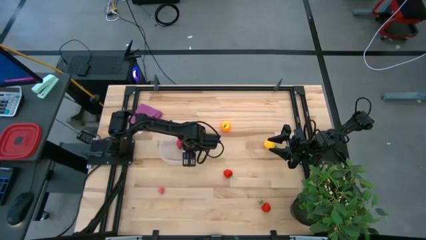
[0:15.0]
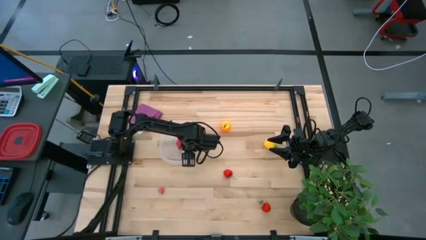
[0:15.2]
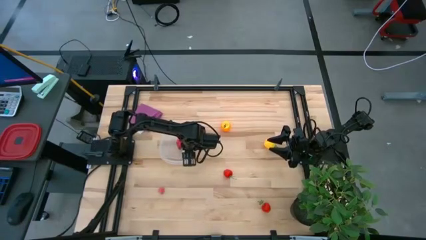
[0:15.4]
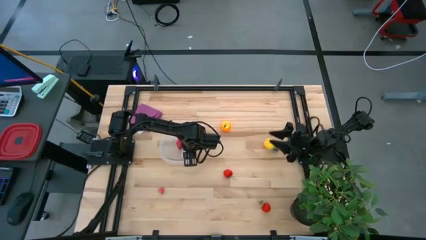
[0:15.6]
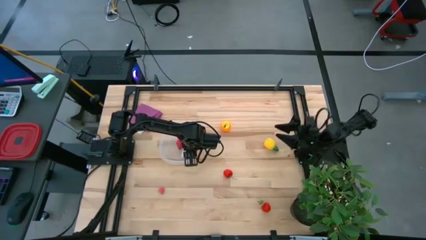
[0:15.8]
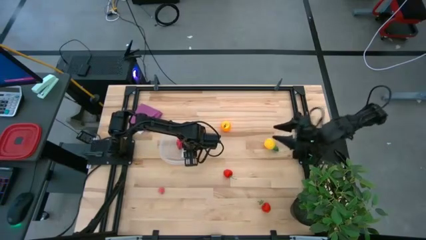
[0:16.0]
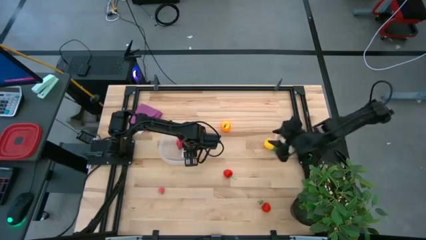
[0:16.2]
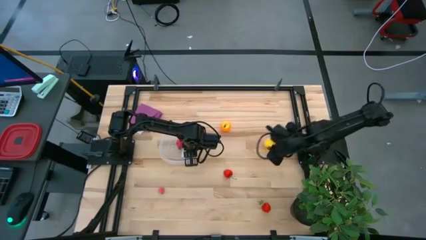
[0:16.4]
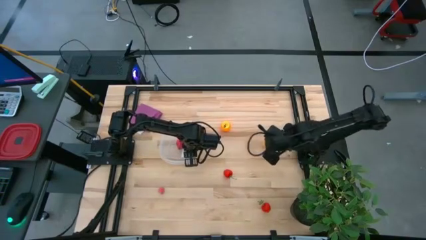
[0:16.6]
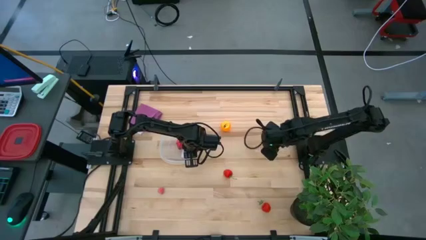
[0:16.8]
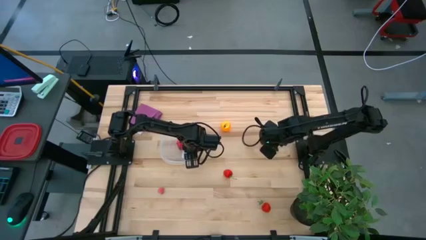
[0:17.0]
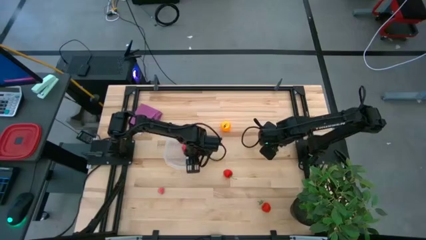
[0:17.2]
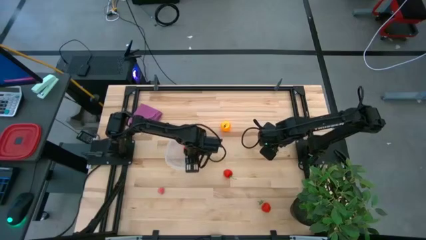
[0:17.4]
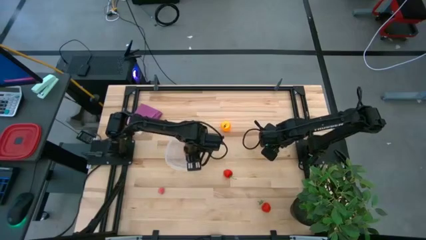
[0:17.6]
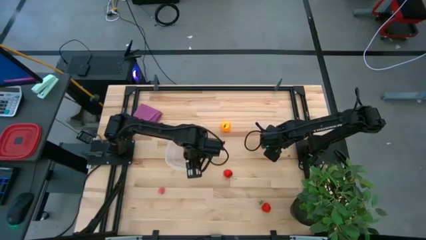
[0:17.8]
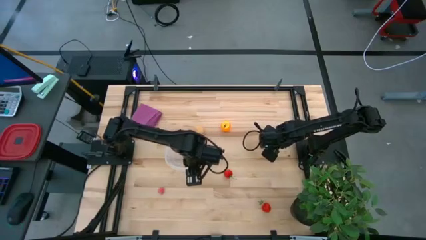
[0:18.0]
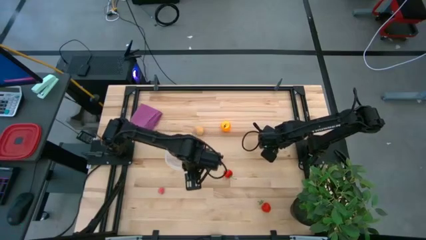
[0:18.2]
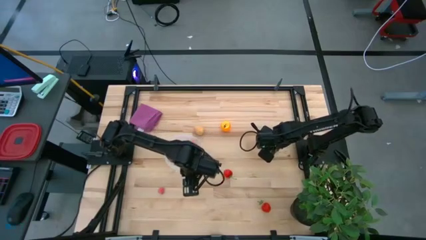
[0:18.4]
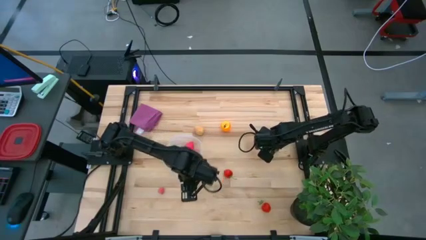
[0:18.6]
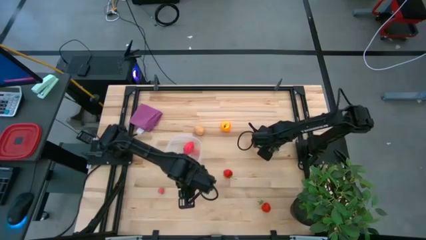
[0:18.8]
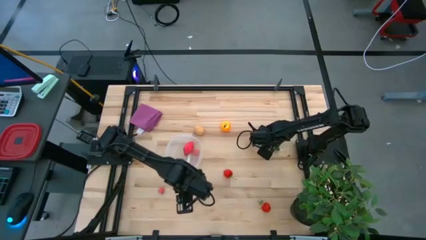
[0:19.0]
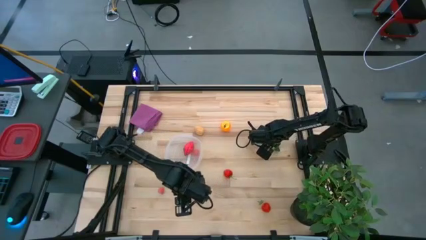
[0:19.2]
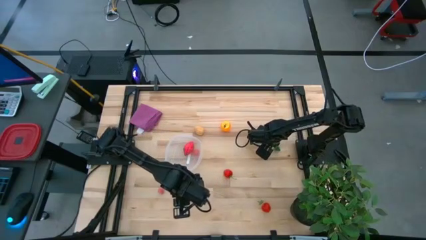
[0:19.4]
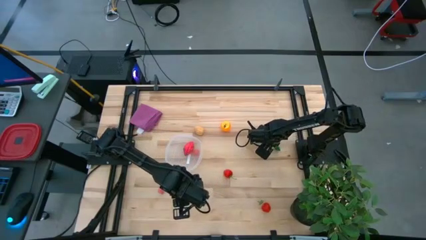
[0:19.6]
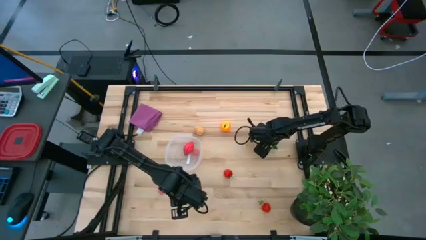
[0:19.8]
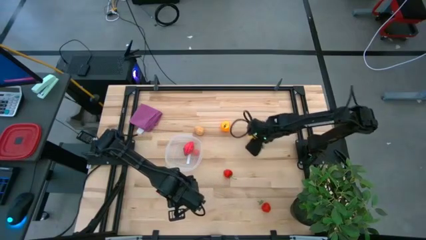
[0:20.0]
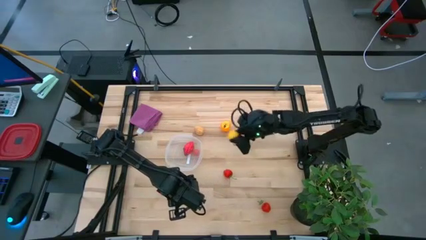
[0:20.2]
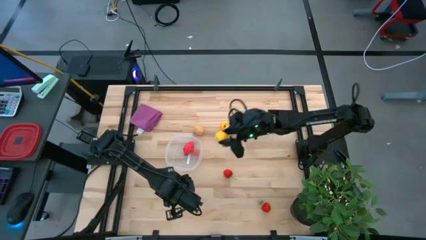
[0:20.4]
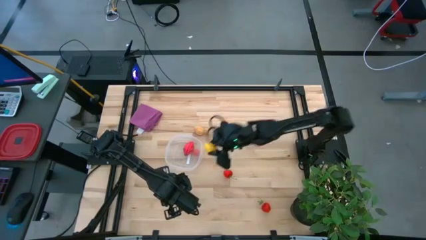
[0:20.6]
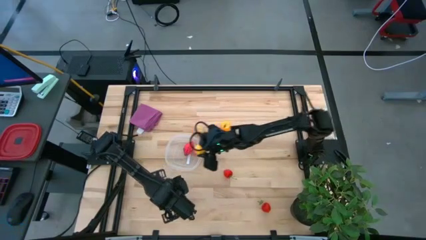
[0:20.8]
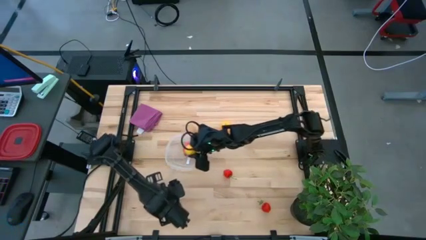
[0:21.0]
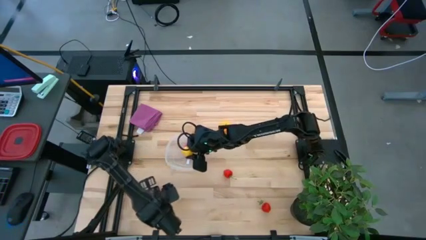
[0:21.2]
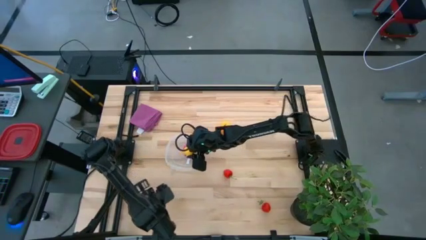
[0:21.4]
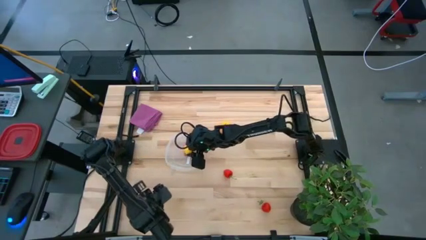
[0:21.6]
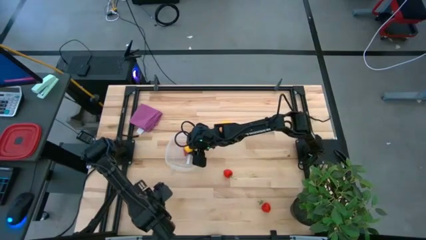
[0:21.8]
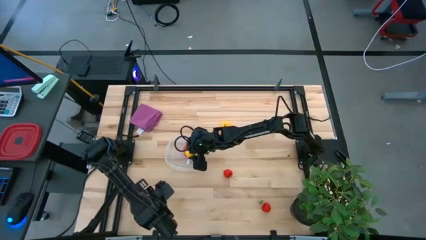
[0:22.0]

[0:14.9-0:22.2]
Task: Pick and placing Produce into tupperware
Put the yellow pineapple into the transparent bin

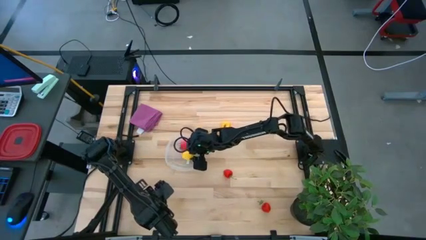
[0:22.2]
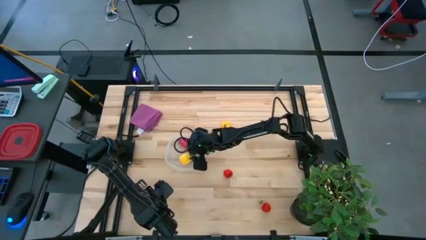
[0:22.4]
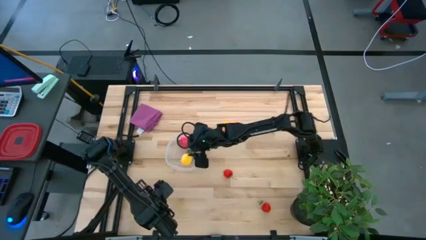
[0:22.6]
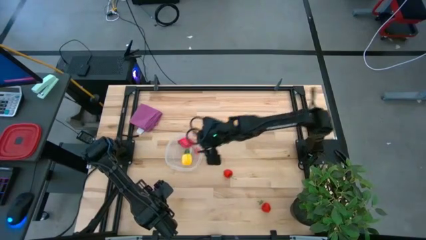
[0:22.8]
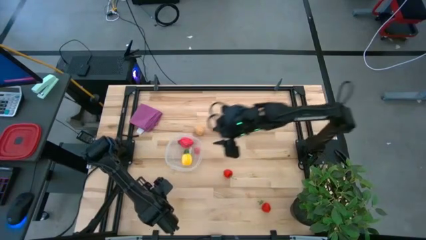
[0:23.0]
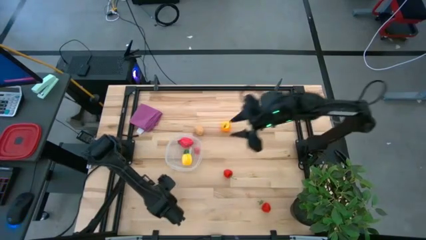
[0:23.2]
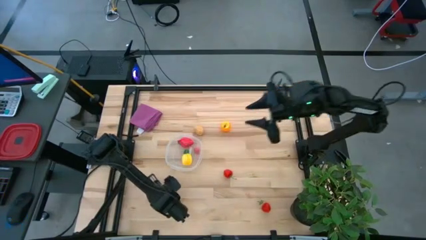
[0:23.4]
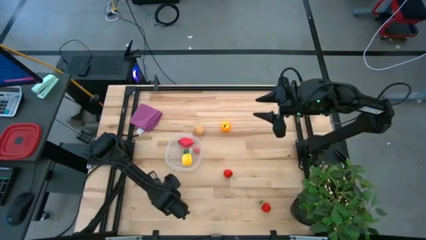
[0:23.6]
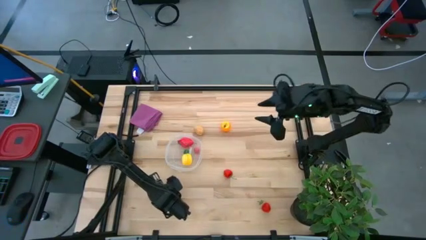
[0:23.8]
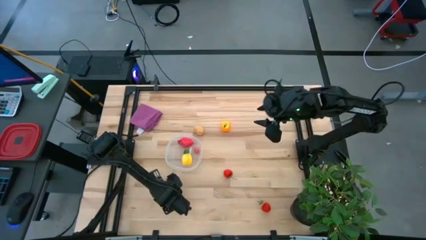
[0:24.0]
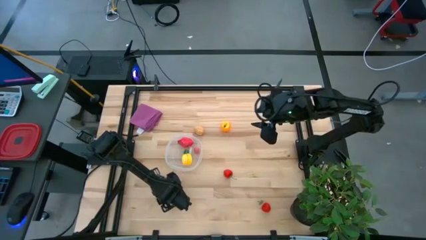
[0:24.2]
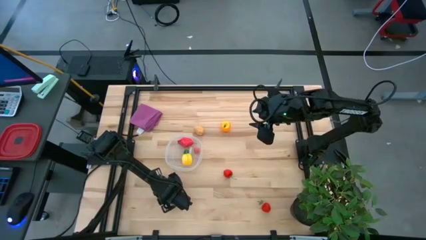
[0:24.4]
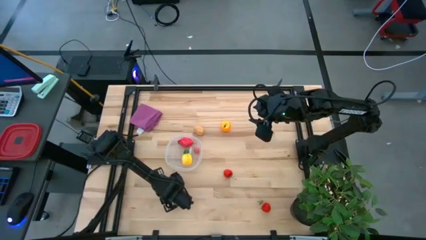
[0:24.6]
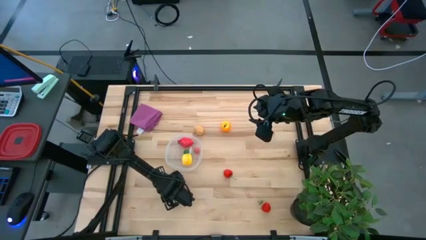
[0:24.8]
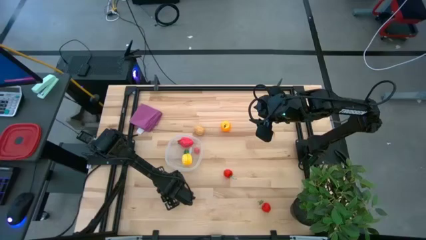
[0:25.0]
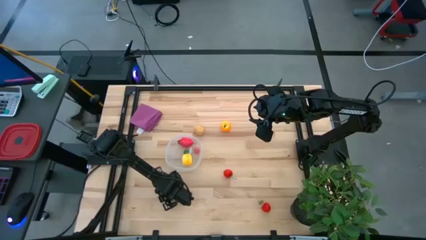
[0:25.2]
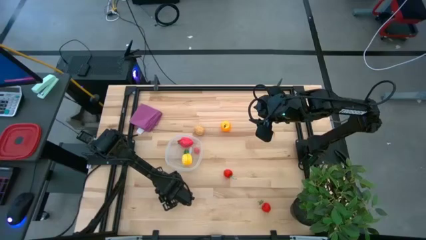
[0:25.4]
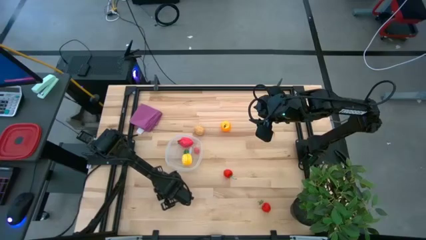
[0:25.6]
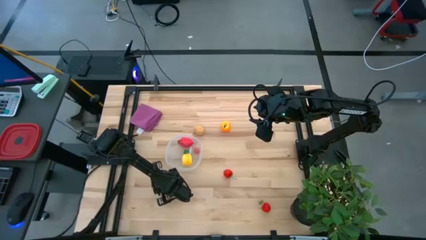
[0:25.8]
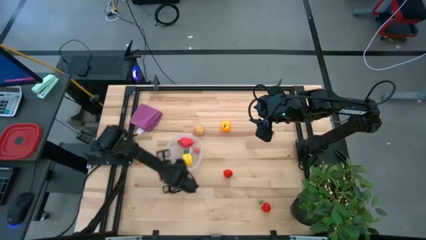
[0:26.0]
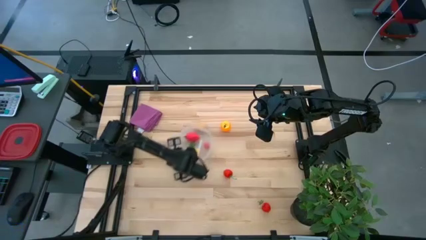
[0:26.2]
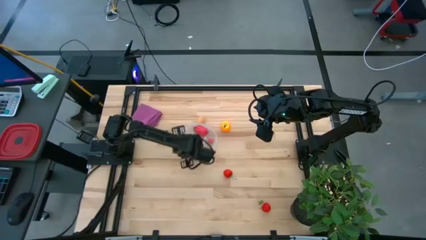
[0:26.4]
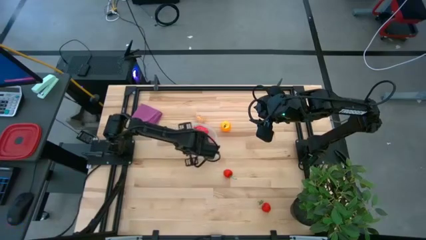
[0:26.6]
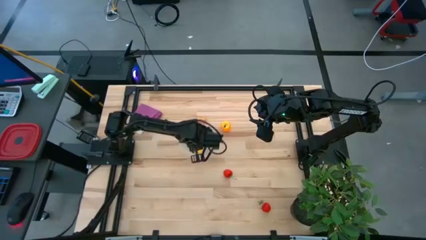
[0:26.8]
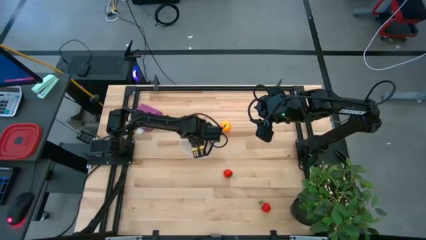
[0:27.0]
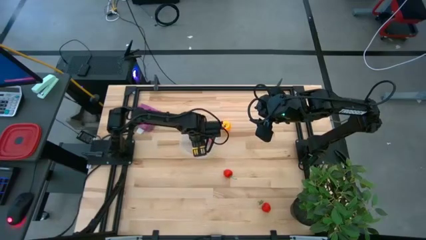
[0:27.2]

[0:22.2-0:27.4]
Put the pink peach into the transparent bin

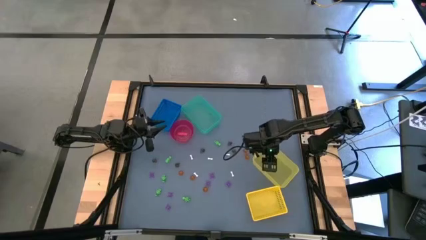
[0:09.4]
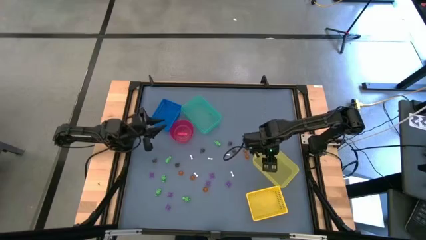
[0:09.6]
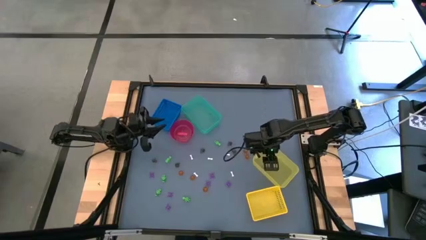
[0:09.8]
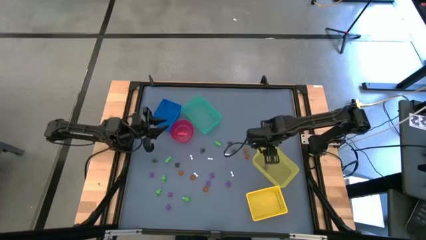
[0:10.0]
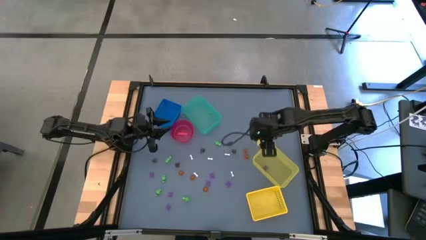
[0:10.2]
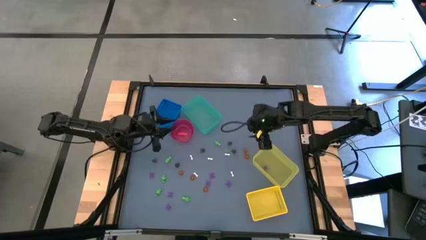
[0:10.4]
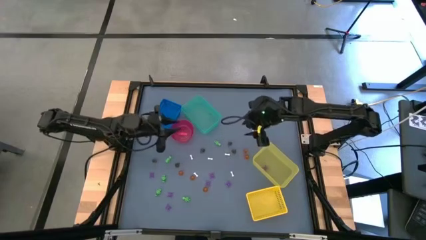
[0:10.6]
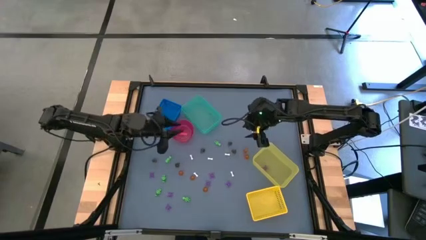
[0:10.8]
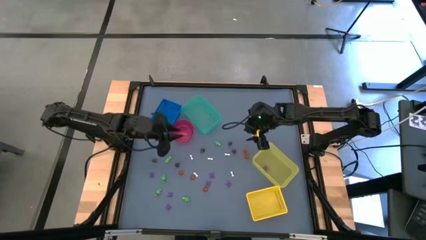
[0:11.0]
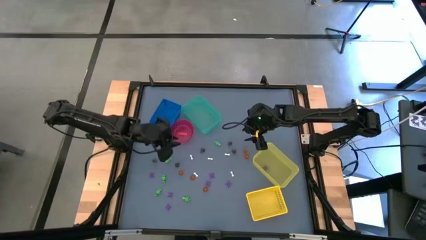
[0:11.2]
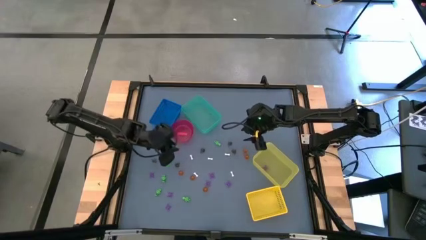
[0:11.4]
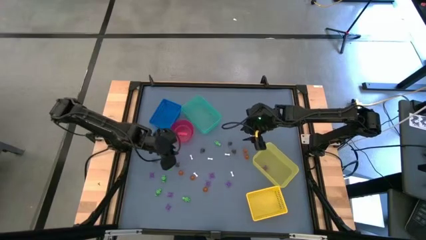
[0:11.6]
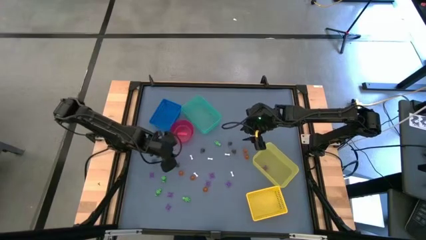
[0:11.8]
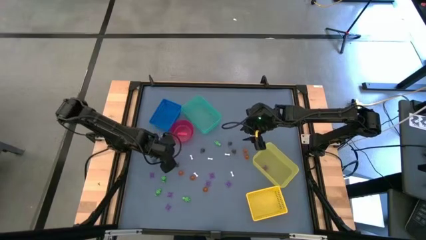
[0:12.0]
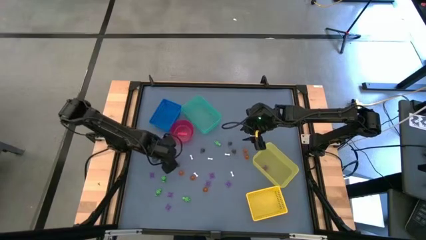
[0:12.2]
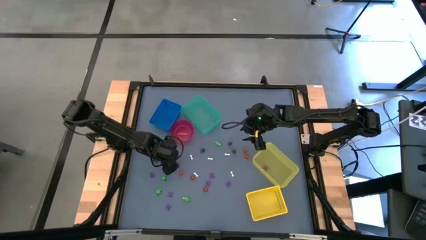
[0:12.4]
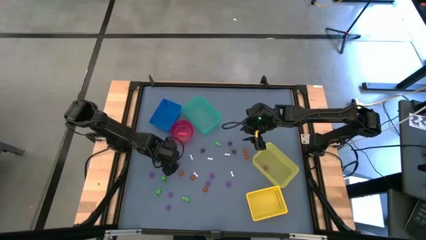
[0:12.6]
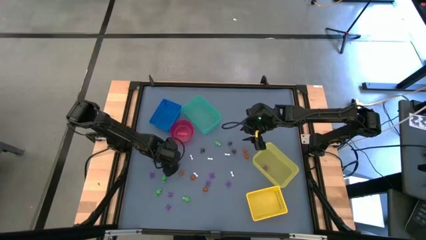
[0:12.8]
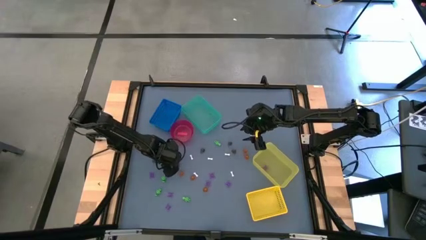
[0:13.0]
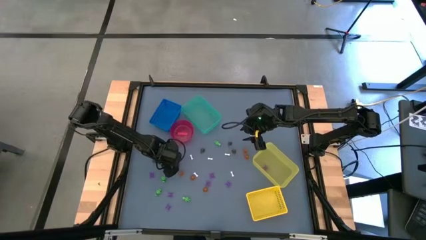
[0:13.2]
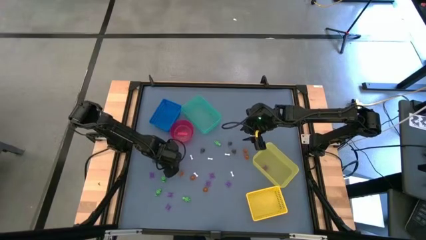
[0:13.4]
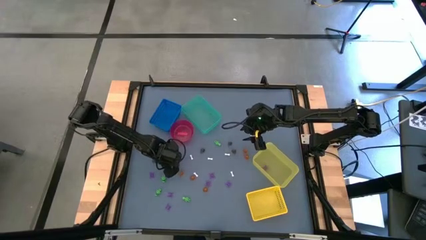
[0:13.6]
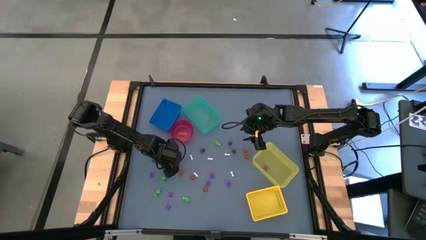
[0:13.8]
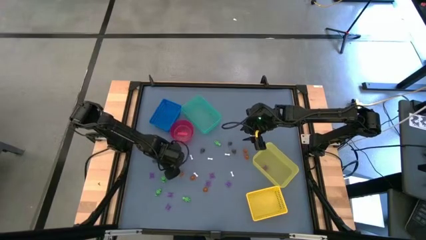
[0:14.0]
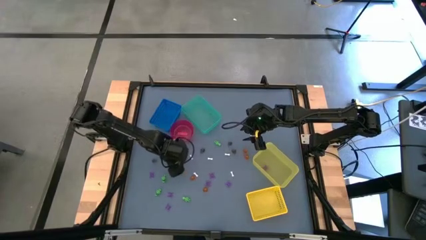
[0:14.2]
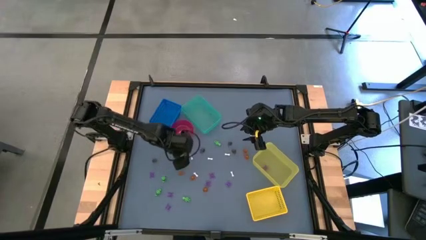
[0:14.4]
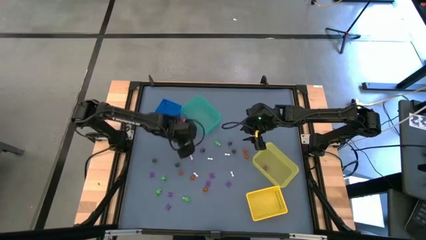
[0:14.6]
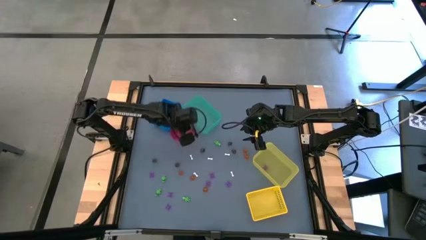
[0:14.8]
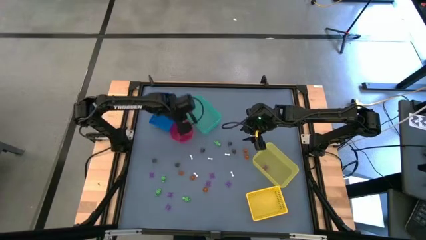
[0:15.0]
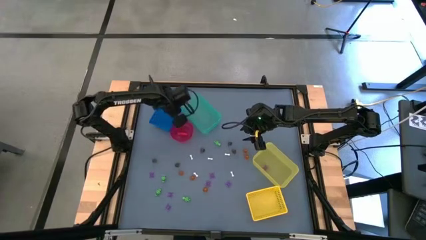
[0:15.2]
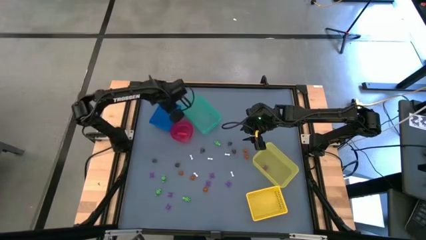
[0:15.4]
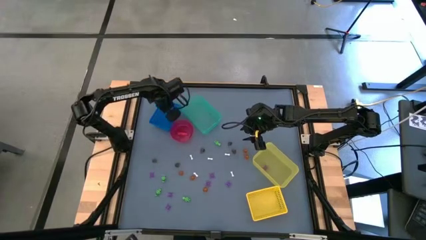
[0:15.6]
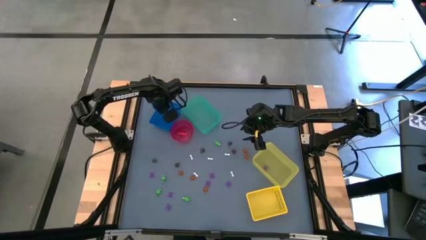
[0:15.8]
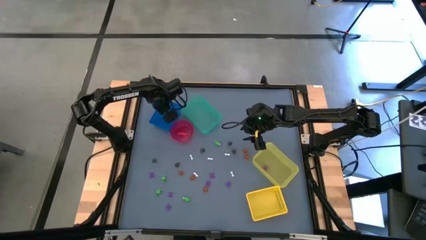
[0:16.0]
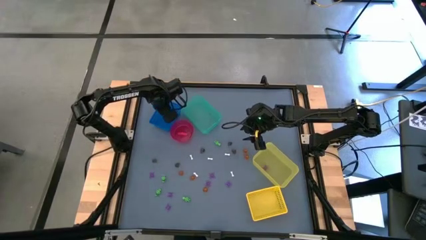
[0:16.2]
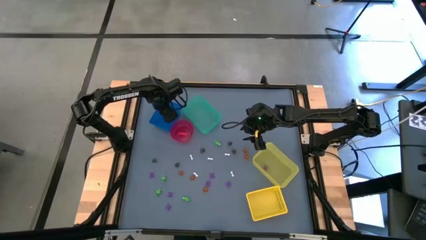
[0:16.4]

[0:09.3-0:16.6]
Task: Sort Halloween decoration
Put the green skeleton toy into the blue bin
